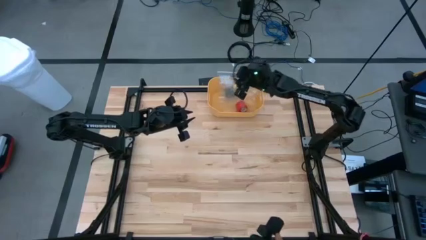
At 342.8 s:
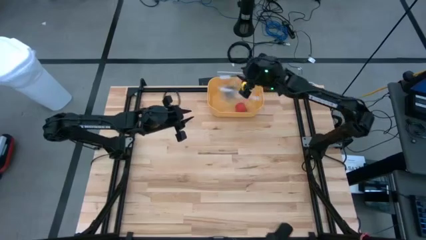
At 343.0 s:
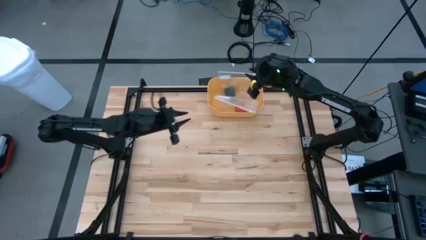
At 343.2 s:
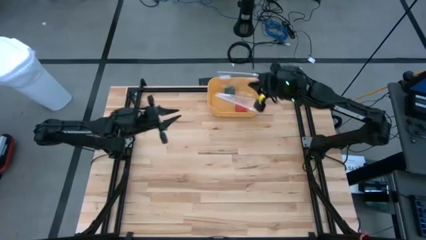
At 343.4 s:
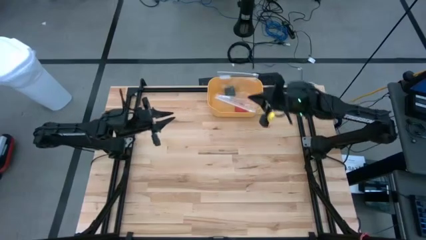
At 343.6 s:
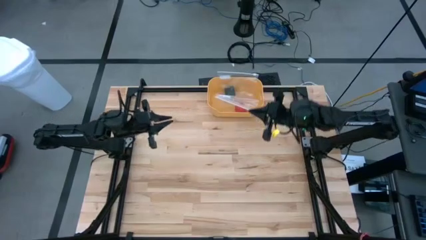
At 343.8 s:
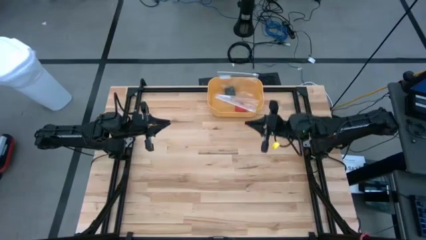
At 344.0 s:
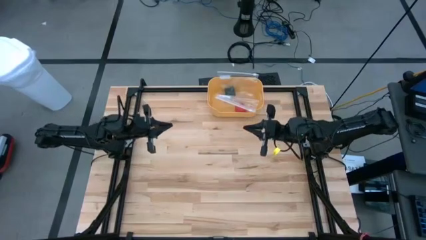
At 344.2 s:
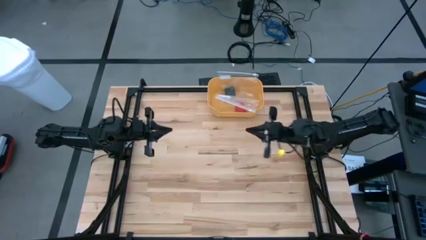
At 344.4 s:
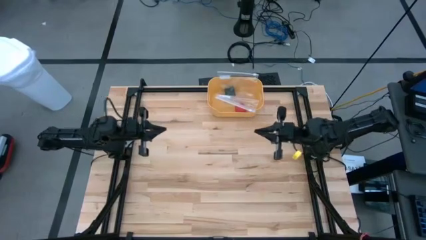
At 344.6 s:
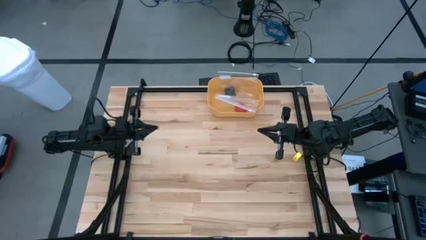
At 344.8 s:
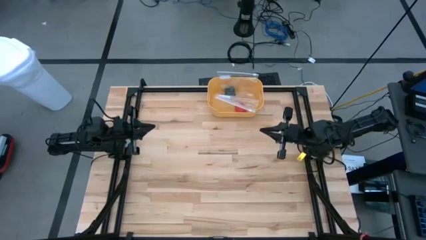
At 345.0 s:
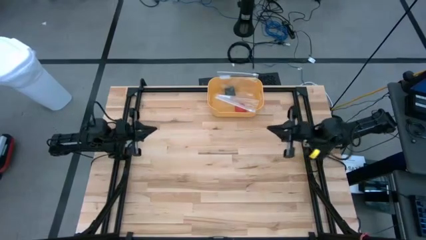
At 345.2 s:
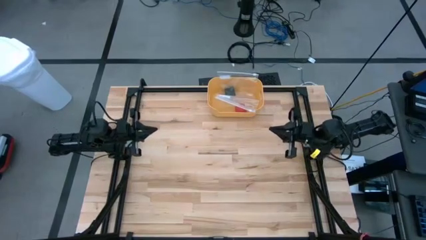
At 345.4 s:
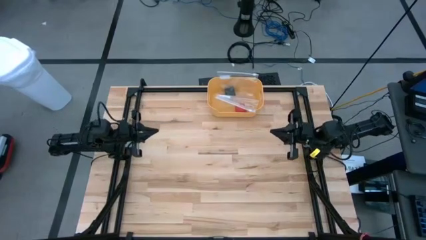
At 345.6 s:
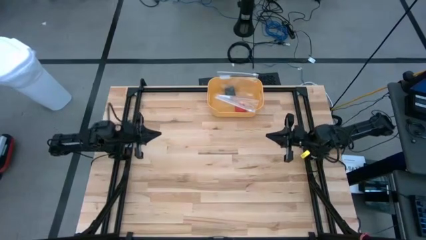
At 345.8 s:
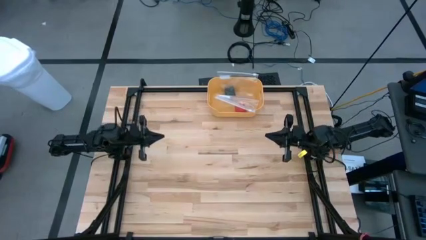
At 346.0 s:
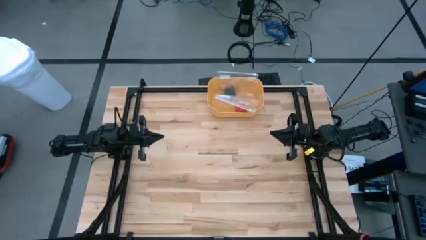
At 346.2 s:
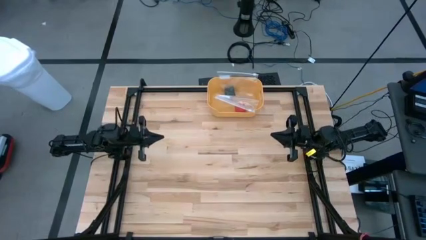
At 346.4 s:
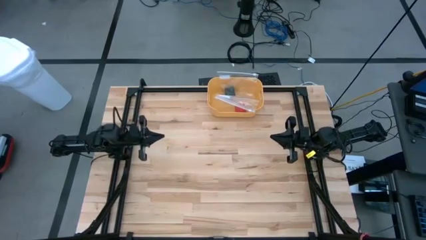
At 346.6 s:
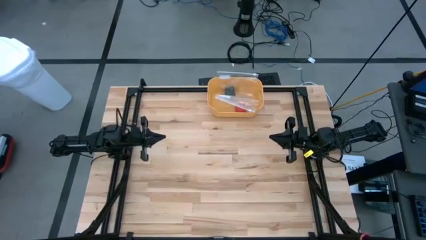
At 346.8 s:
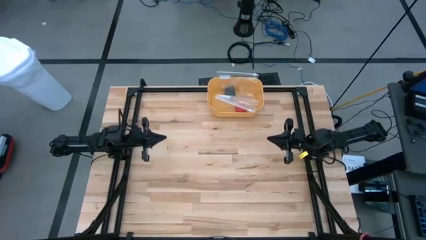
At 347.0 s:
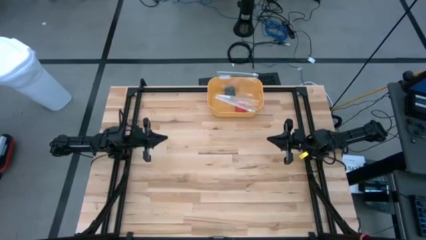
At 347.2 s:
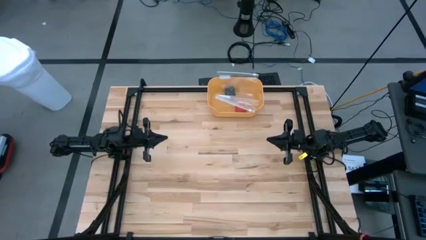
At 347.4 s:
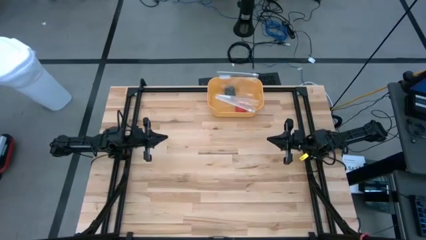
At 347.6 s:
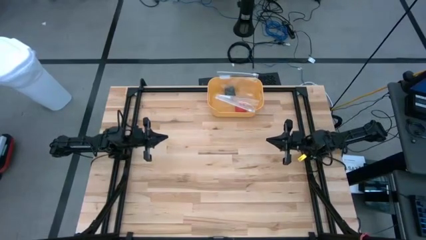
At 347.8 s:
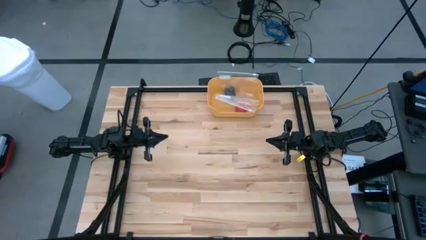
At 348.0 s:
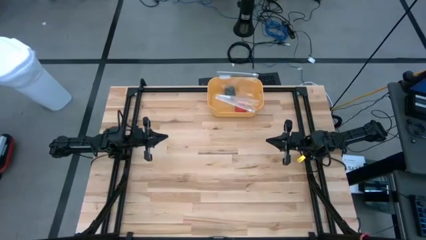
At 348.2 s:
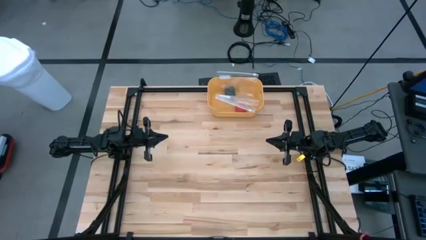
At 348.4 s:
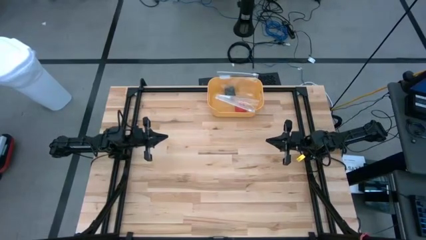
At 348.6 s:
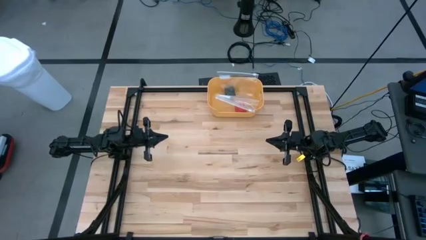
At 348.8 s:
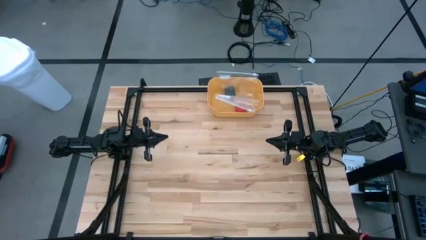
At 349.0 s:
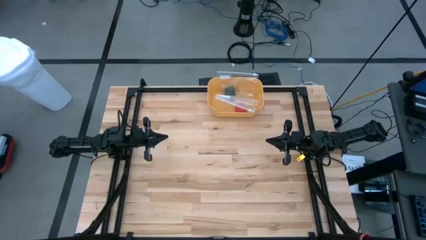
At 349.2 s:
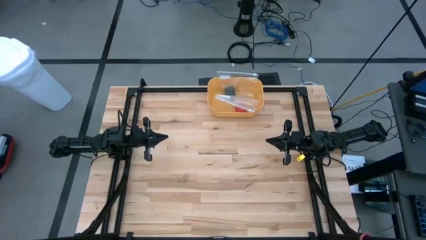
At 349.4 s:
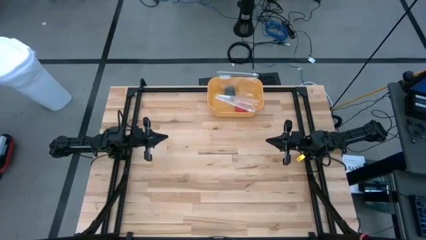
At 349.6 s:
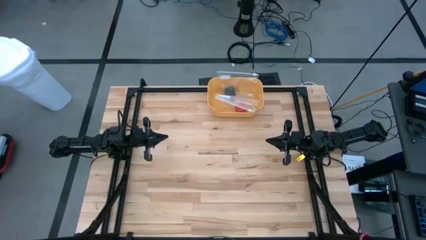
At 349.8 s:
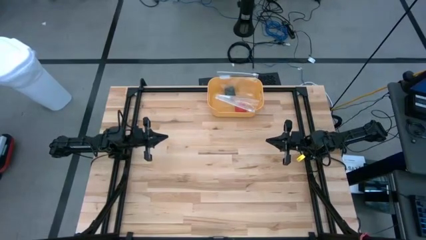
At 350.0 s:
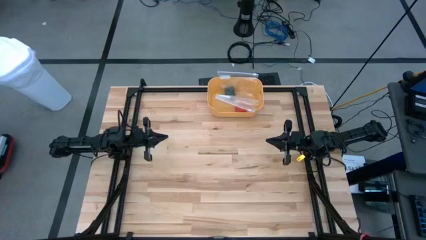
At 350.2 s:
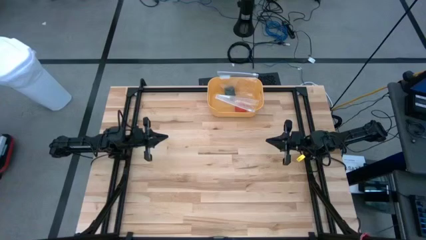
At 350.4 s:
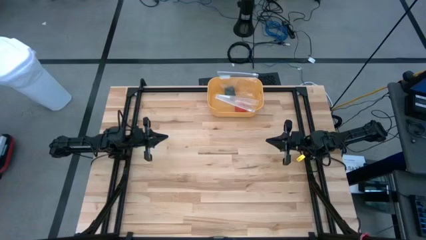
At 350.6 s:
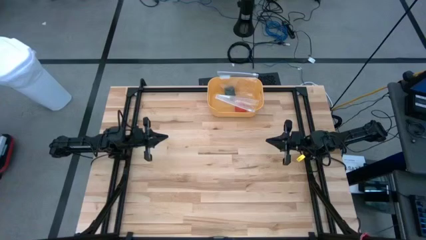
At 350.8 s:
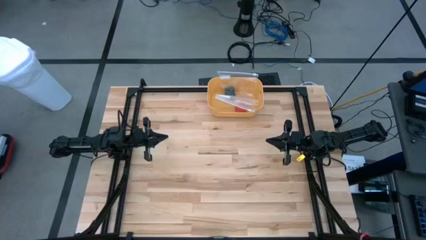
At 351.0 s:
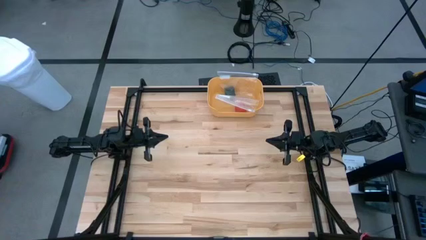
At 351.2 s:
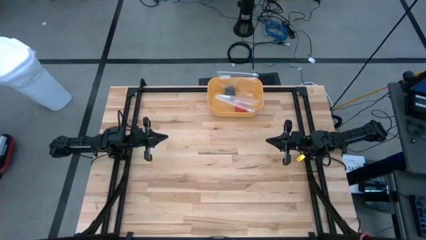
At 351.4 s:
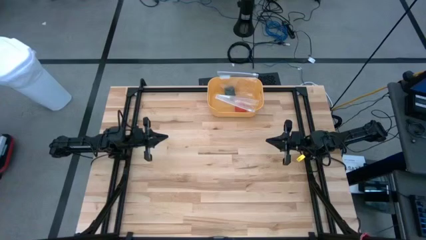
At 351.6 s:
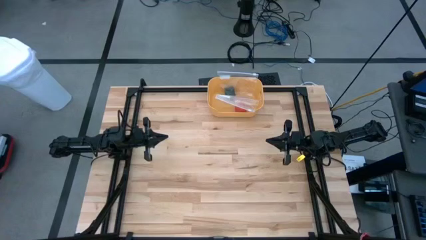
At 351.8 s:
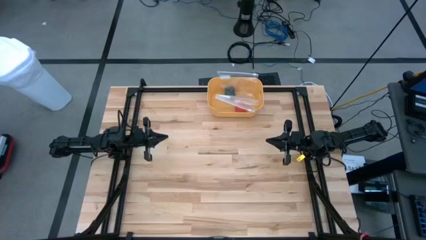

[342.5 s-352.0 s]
Task: Roll bandage
Return to Home Position

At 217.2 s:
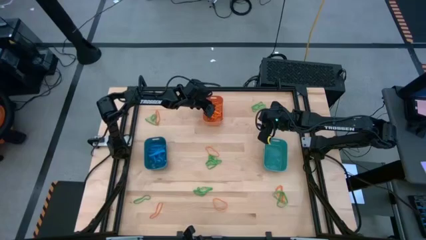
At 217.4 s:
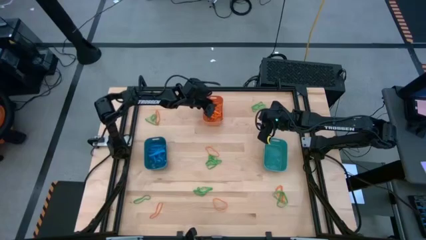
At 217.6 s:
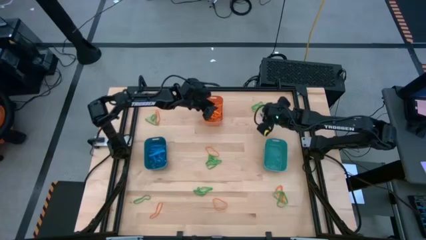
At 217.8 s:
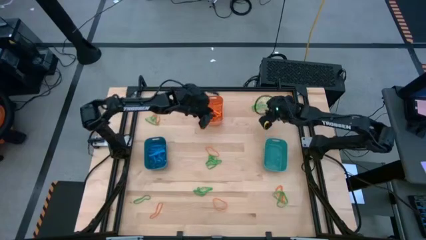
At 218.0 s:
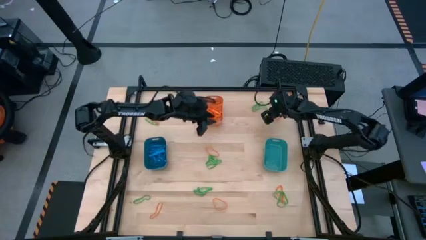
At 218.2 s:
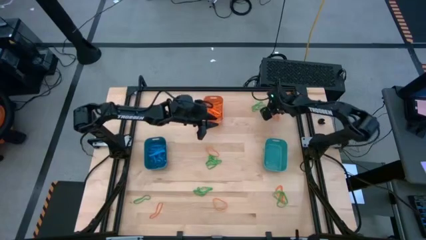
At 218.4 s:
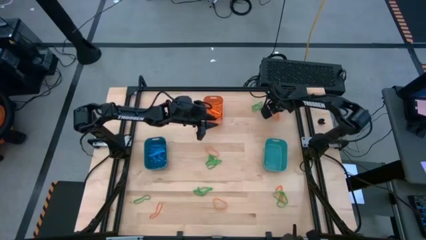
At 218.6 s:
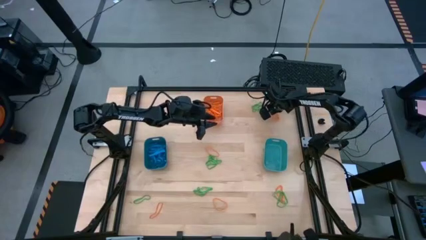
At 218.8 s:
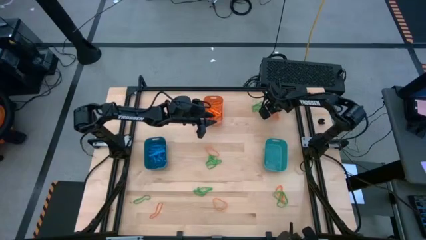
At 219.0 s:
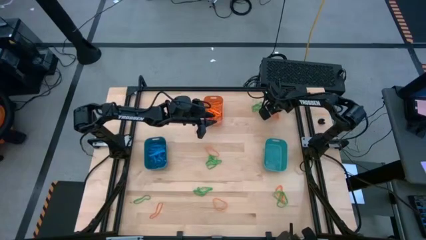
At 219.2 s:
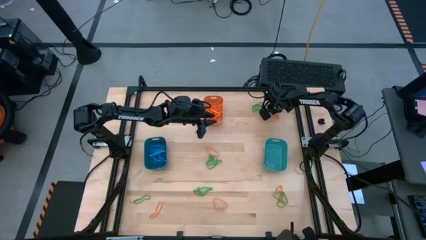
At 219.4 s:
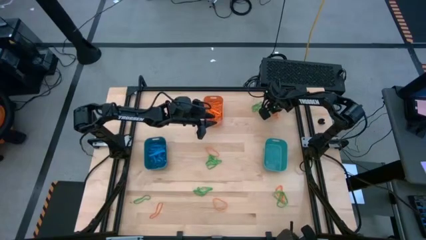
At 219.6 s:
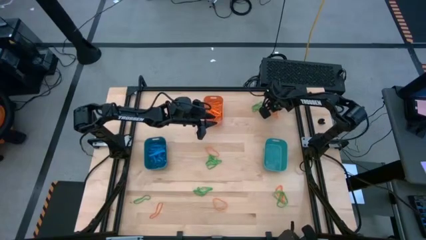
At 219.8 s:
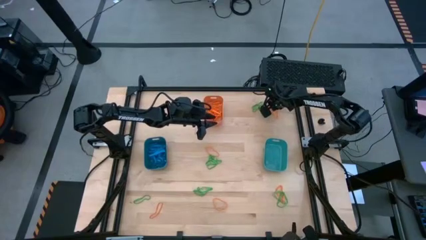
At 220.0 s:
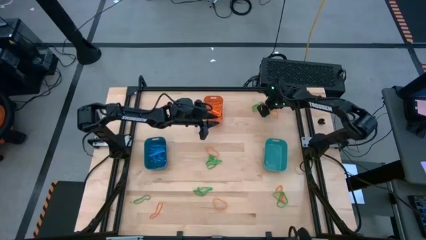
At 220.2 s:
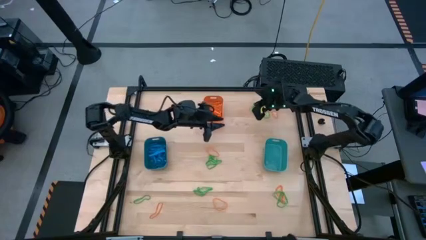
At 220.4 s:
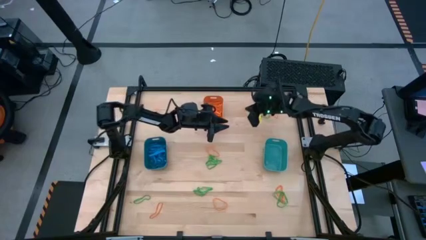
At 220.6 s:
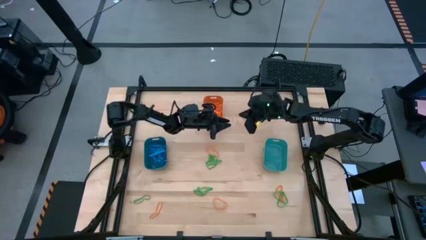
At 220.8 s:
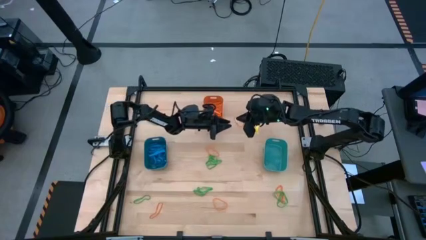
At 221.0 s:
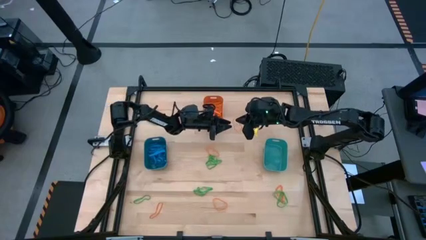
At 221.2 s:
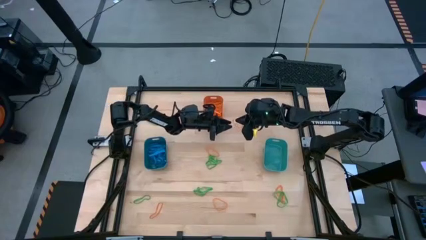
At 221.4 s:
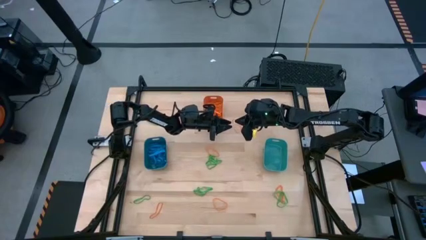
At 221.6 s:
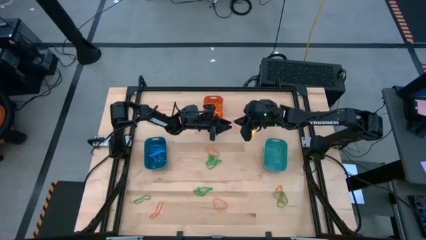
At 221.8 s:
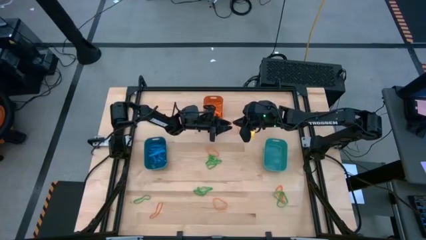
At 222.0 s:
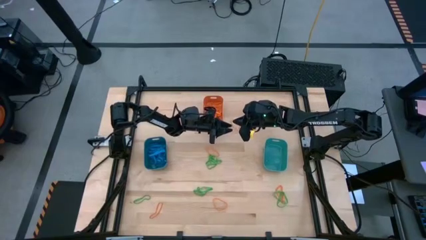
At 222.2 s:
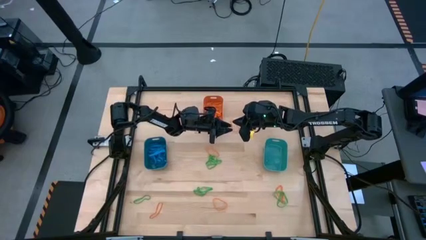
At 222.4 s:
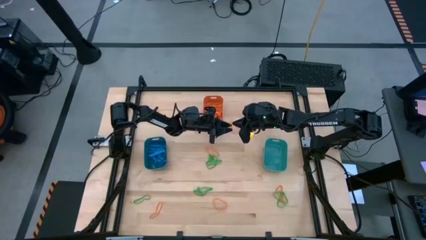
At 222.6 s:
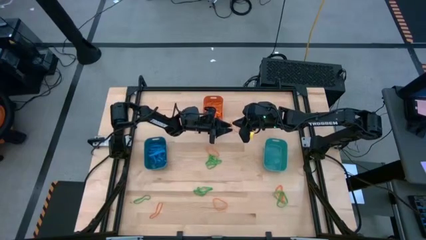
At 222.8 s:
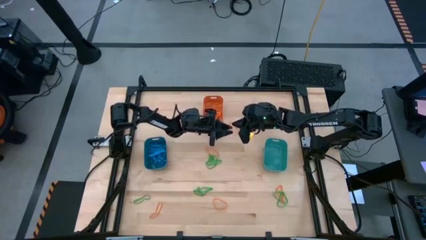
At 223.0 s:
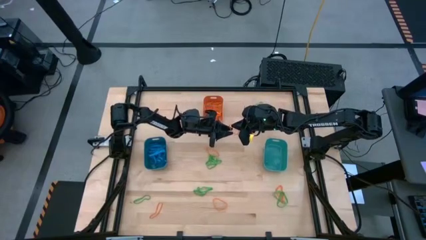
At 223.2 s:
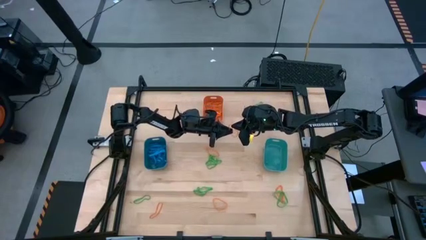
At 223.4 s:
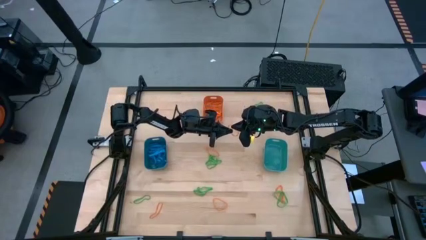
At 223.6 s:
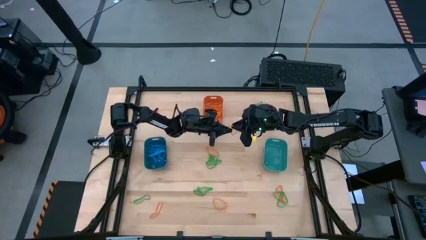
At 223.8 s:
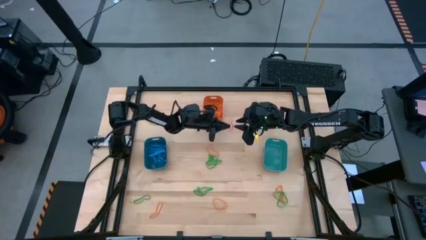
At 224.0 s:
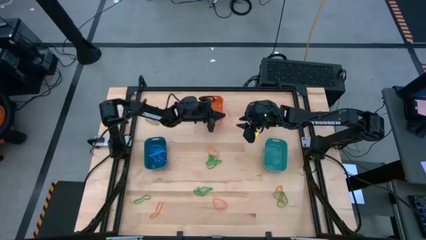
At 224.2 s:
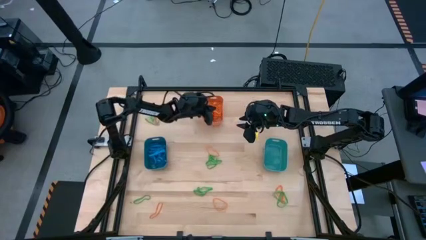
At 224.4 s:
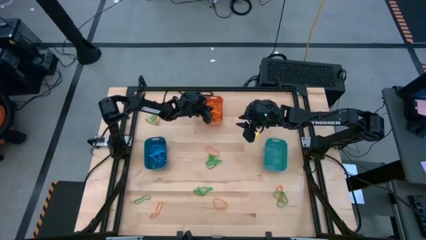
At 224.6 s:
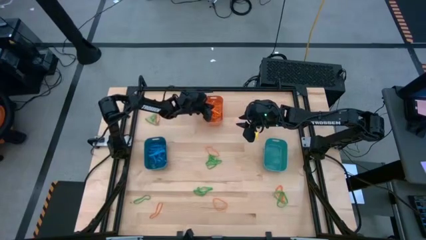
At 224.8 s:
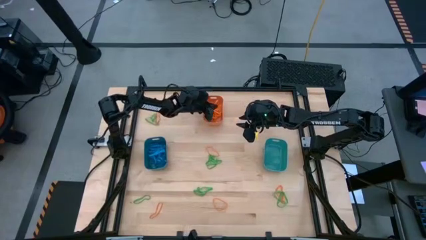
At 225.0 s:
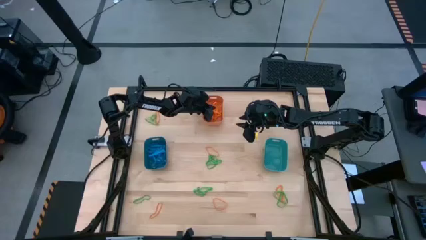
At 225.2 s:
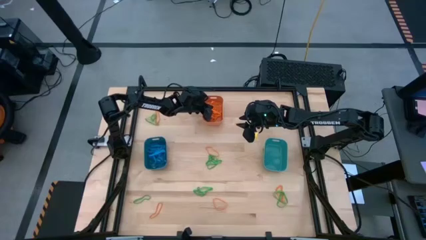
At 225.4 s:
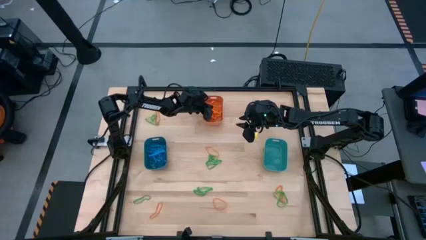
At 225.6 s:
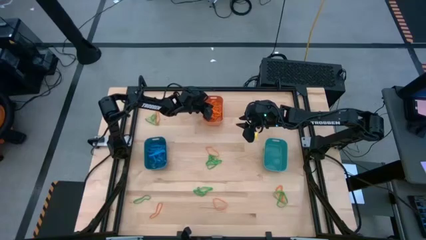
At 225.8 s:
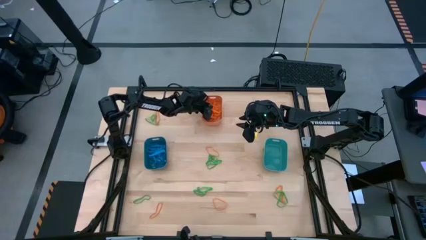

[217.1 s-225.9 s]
Task: Sort rubber bands into baskets
Put the orange rubber band into the orange bin
